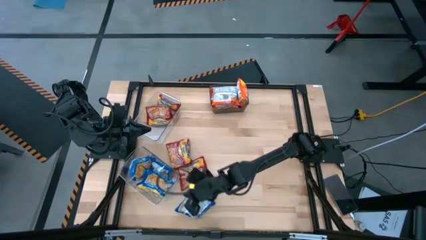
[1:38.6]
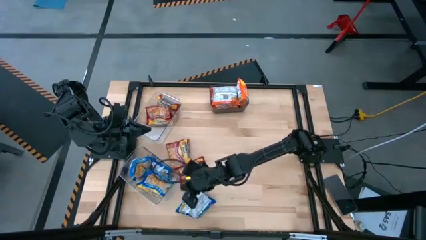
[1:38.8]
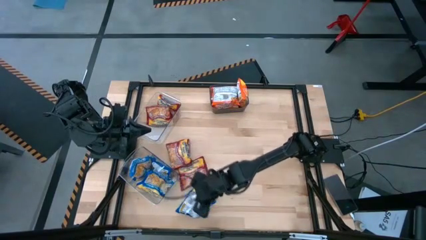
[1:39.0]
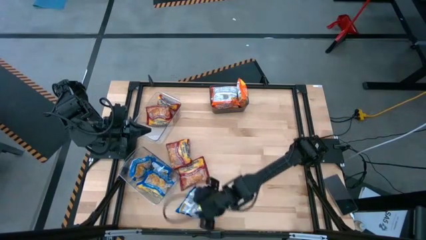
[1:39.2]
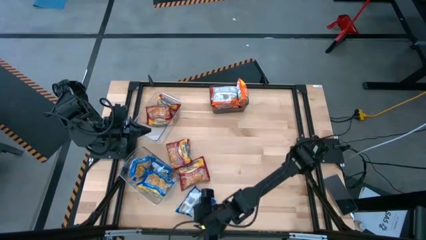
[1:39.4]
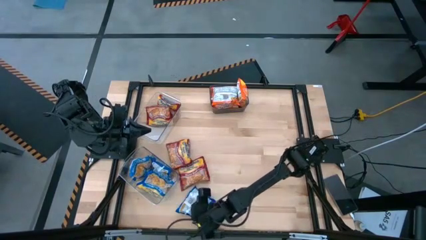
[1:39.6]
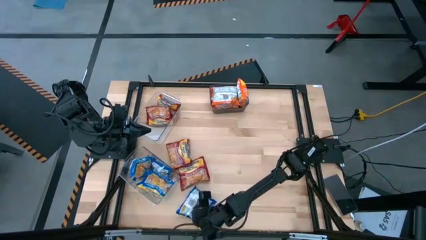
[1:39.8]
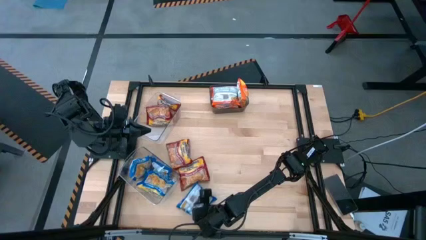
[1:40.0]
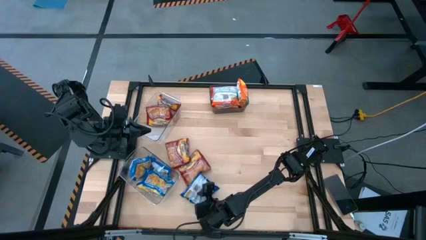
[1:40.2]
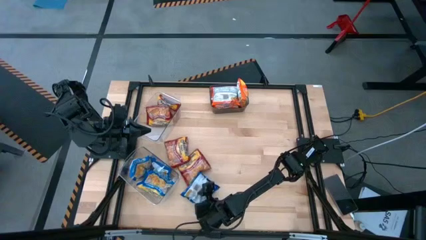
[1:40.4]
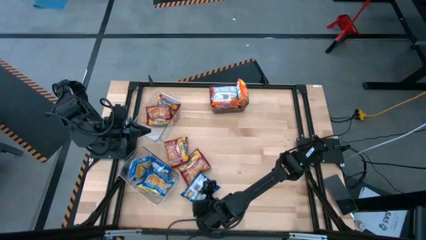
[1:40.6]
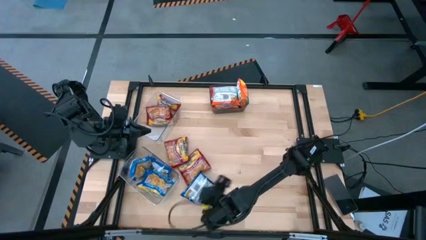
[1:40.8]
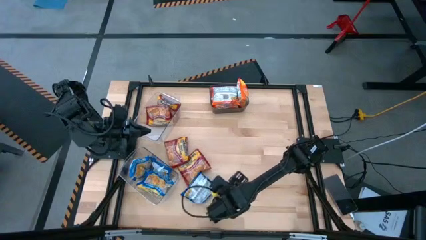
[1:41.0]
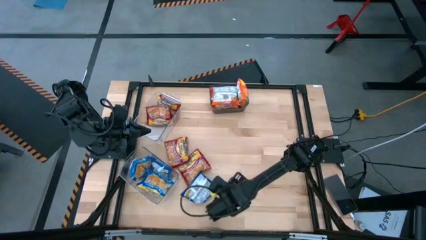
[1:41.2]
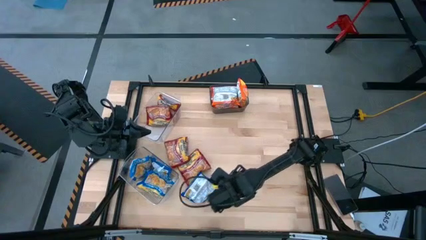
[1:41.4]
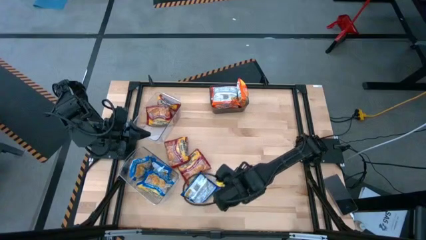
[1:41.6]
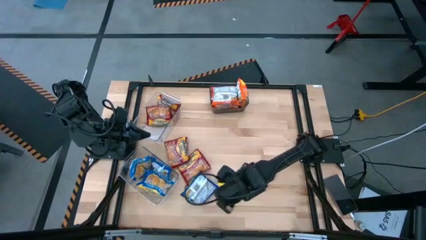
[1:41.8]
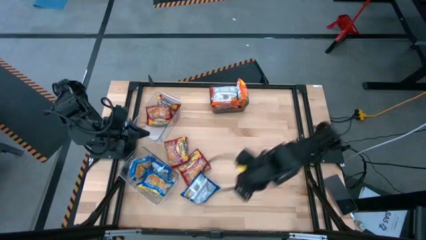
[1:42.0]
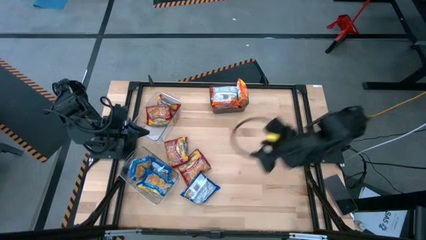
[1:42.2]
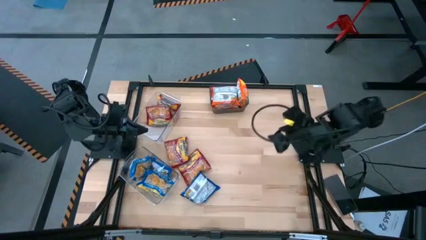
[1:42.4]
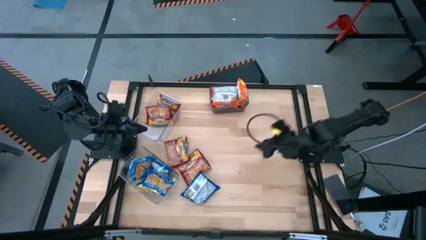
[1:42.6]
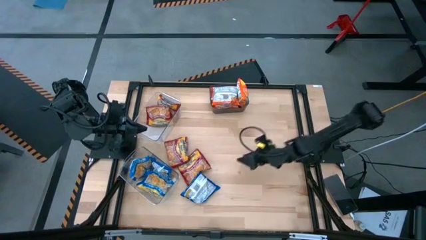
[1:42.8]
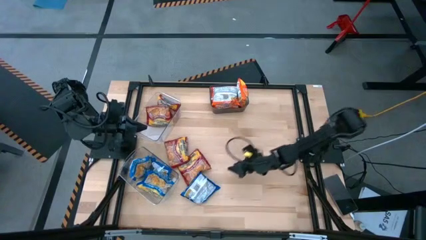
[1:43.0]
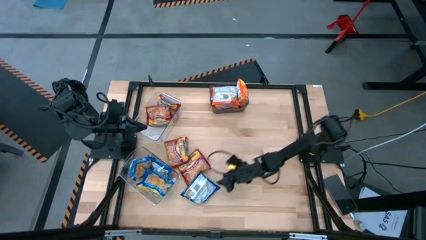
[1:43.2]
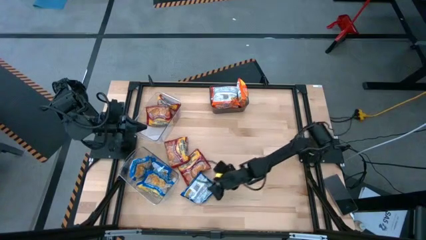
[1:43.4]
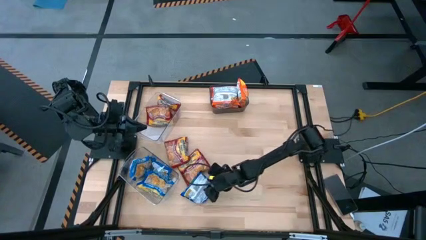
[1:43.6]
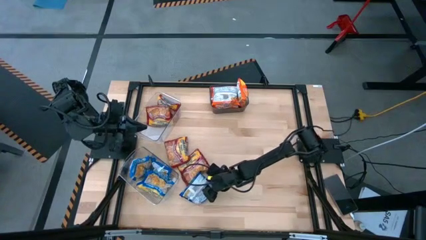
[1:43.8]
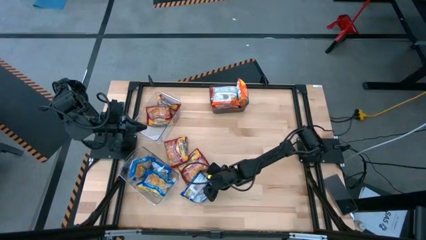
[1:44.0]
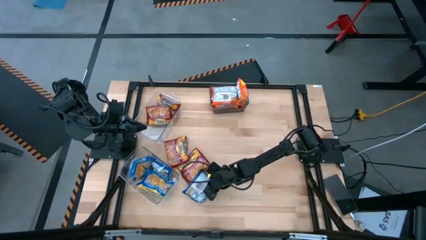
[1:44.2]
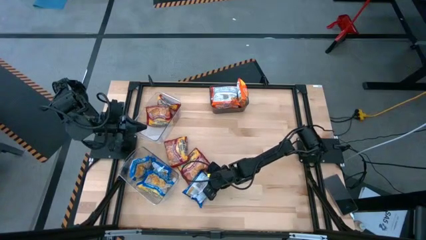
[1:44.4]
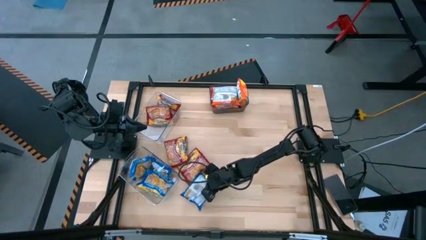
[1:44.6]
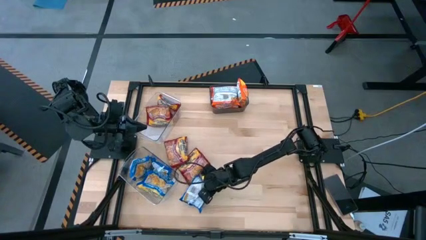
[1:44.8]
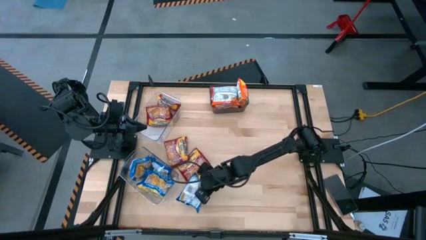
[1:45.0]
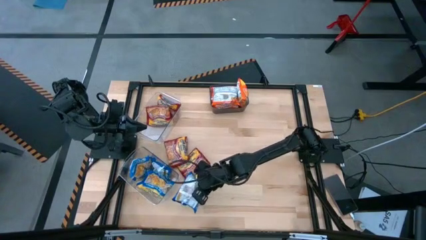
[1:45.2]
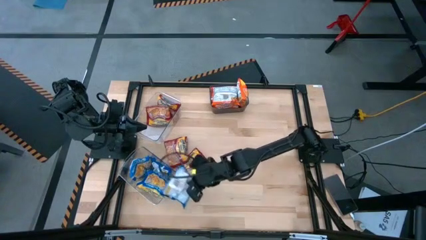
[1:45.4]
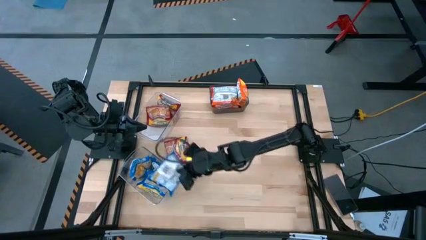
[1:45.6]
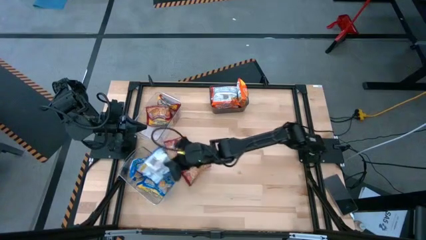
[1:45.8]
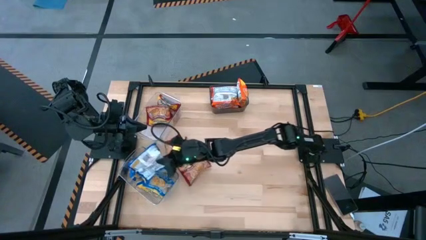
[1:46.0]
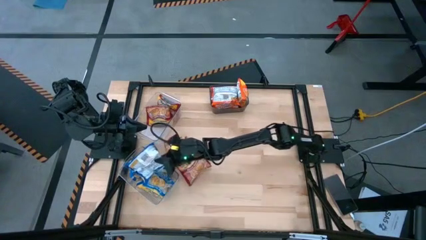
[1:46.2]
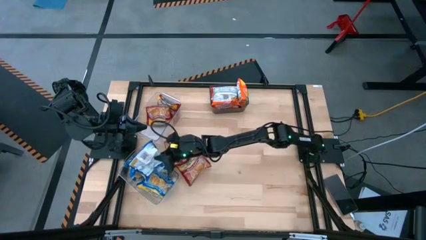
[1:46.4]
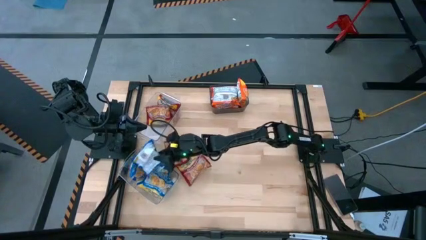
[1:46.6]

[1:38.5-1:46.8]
Task: Sort Maruchan noodles
Put the blue noodle pack into the bottom transparent bin

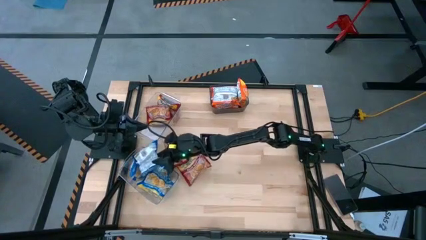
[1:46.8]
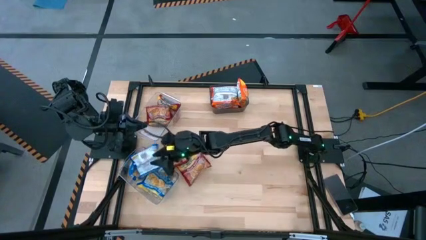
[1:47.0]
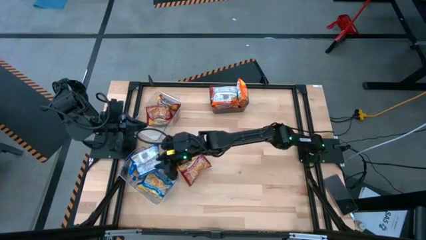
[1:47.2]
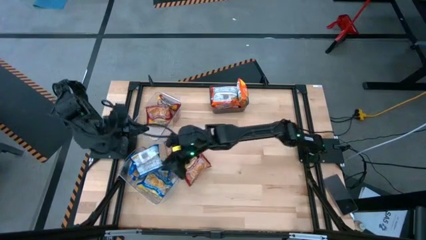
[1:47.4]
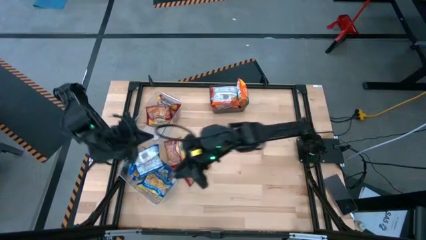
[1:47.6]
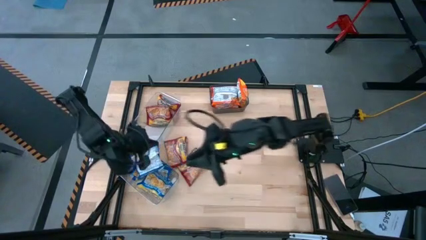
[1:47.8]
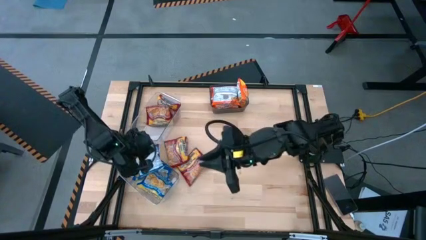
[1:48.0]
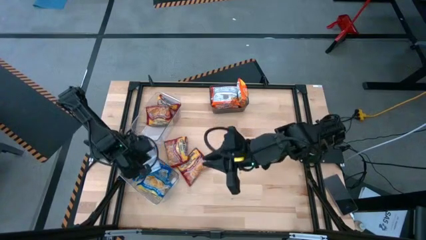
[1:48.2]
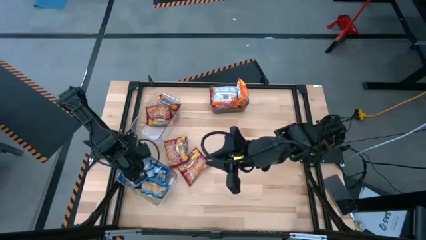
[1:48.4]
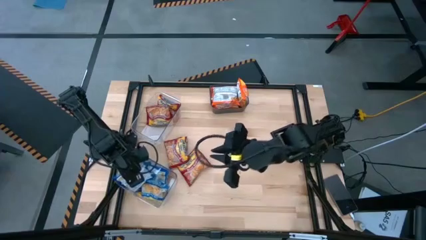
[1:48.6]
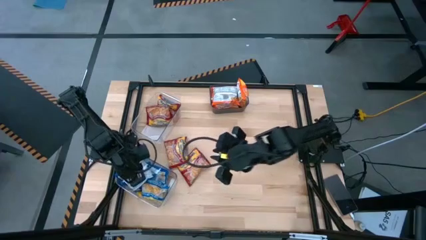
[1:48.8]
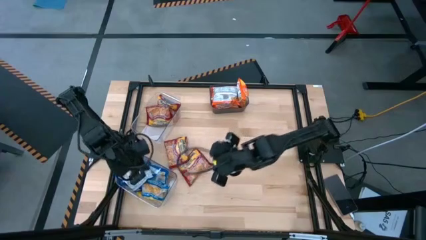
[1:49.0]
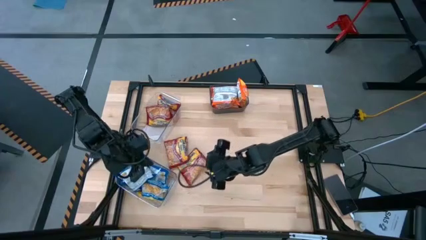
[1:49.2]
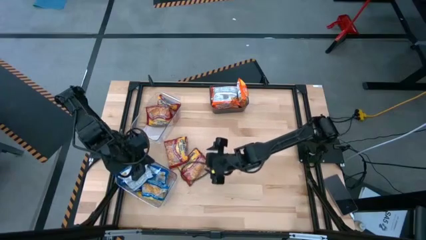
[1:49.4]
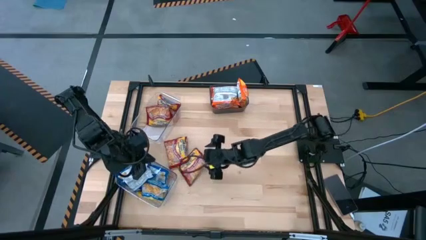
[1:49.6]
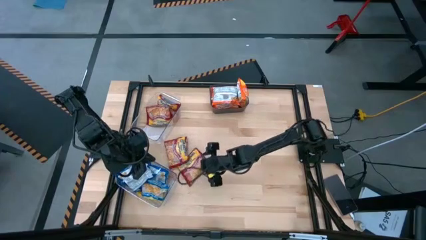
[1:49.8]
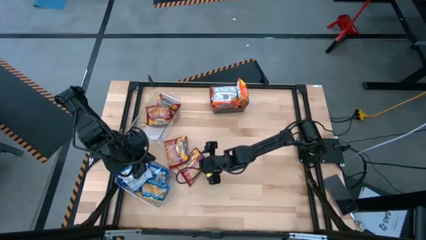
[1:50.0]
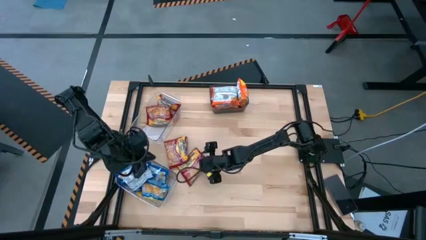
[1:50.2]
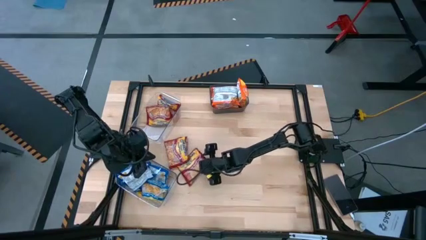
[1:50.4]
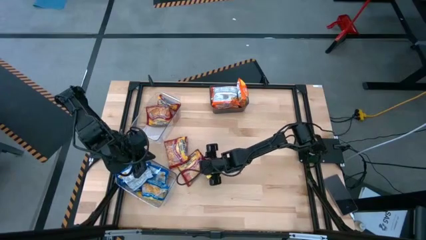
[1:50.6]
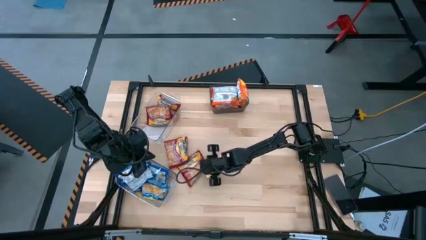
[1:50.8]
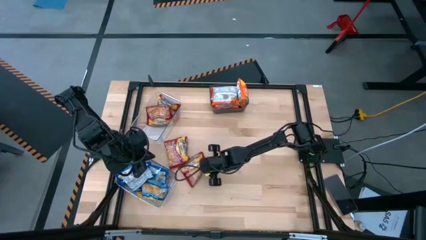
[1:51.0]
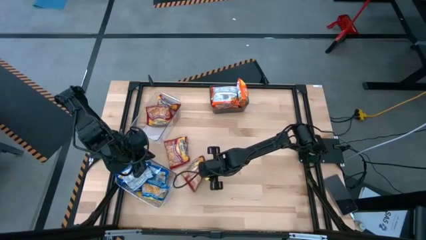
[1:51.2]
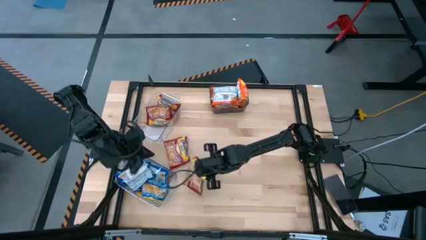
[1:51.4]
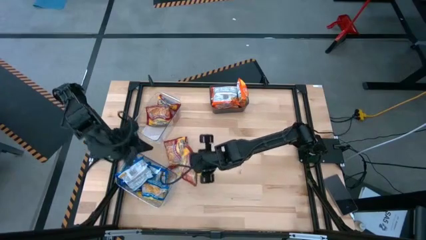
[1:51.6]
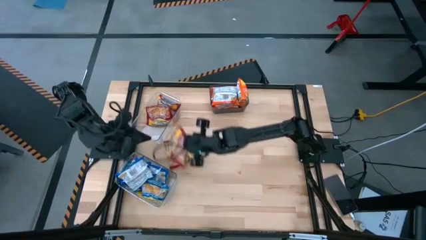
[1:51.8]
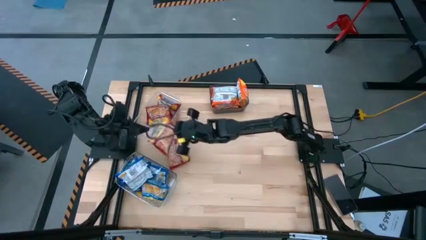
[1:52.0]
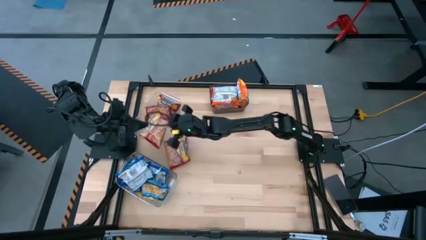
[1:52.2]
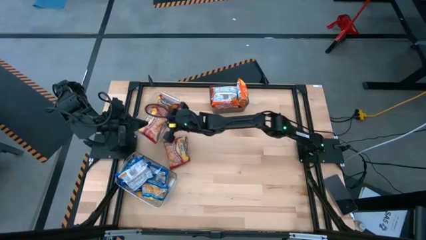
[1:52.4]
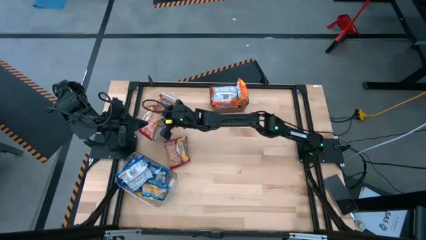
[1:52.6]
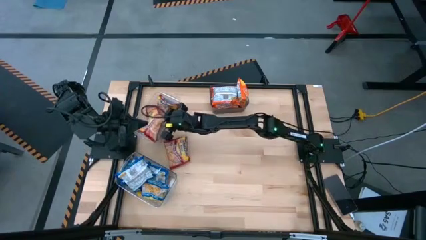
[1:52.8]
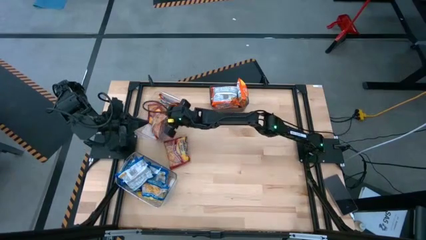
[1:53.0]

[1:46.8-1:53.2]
Put the bottom red noodle pack into the top transparent bin

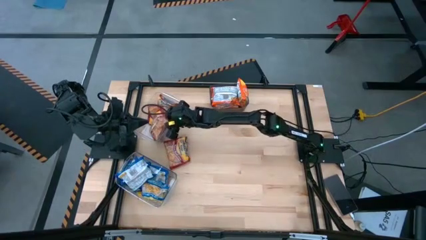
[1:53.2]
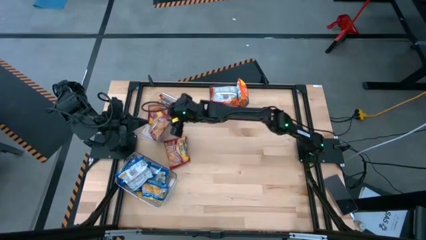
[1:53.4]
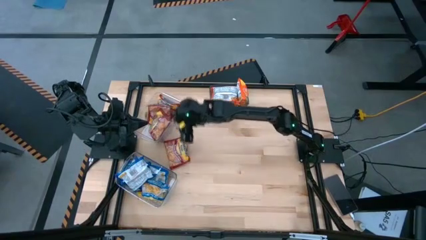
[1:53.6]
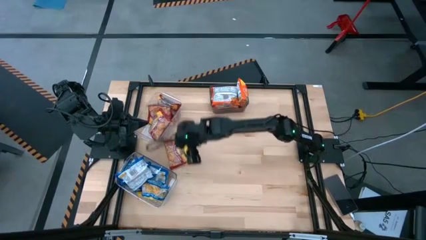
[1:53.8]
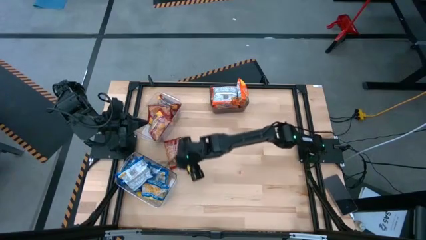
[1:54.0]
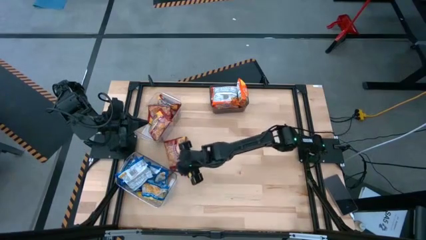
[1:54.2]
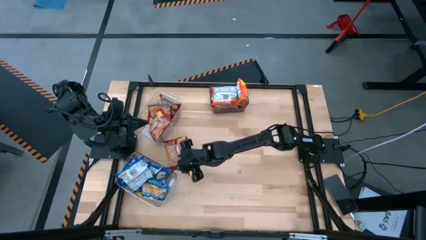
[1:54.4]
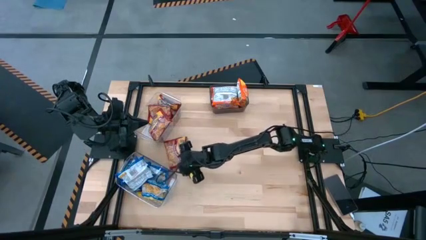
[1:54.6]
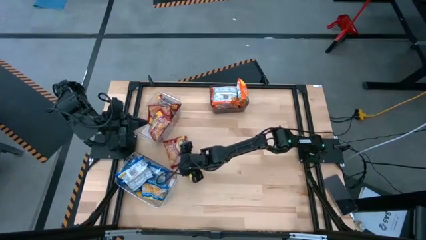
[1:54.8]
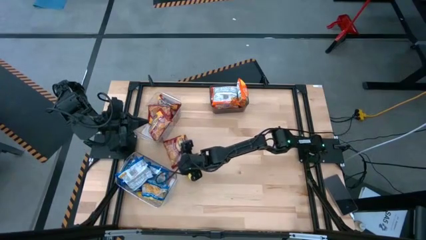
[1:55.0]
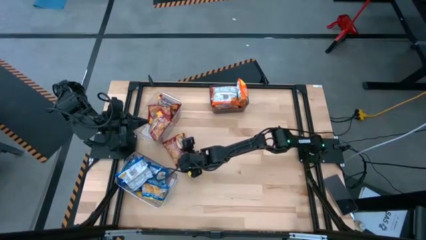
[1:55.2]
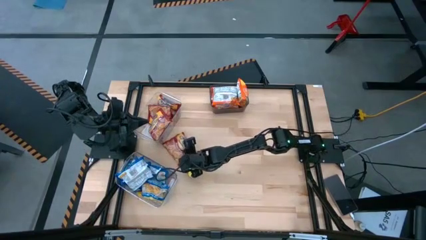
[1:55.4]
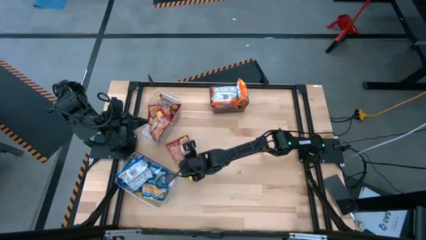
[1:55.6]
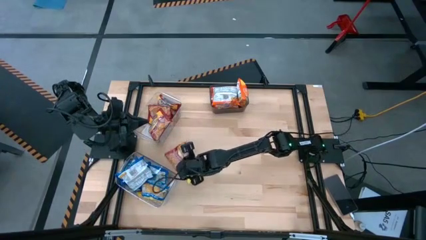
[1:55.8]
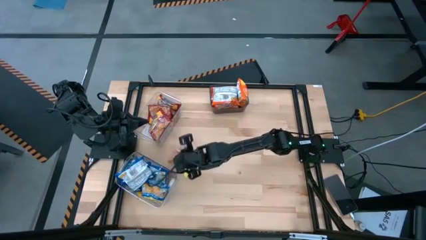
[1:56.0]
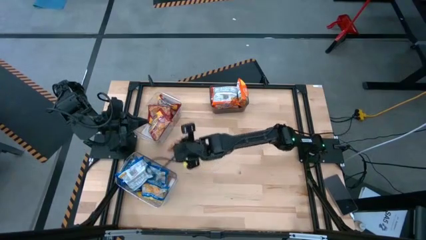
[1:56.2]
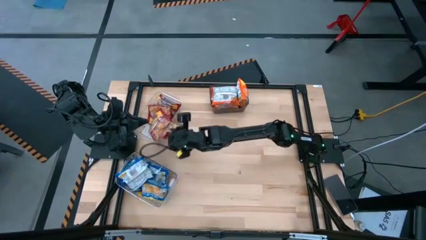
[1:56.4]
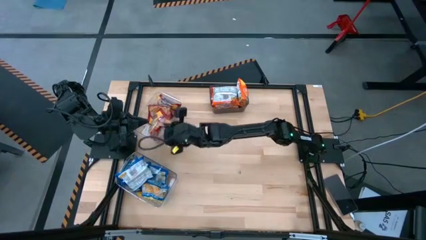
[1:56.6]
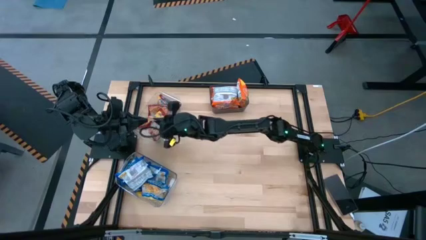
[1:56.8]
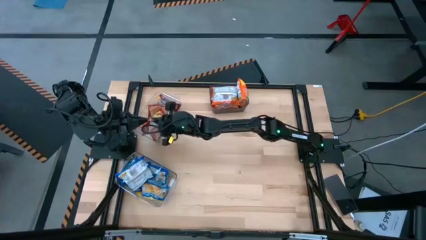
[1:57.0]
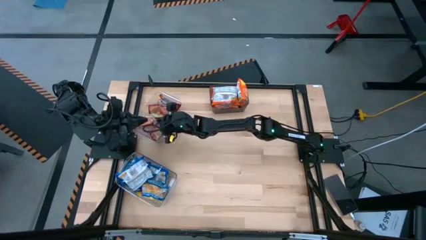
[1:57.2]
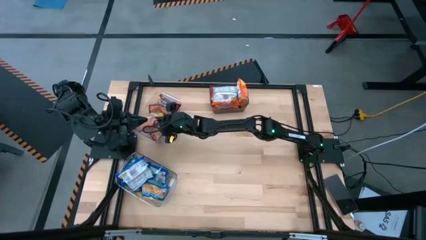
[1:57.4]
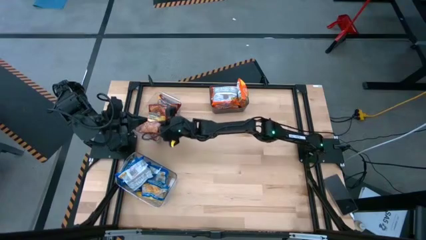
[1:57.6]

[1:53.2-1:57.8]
Put the red noodle into the top transparent bin
